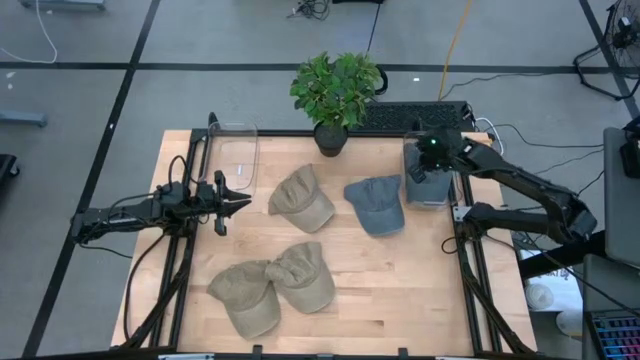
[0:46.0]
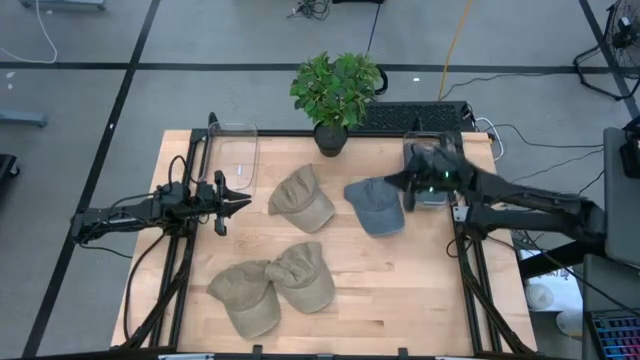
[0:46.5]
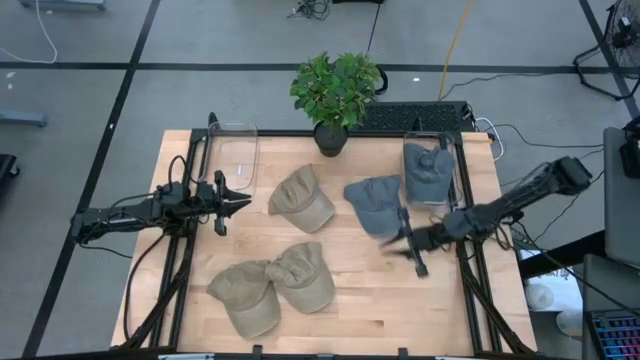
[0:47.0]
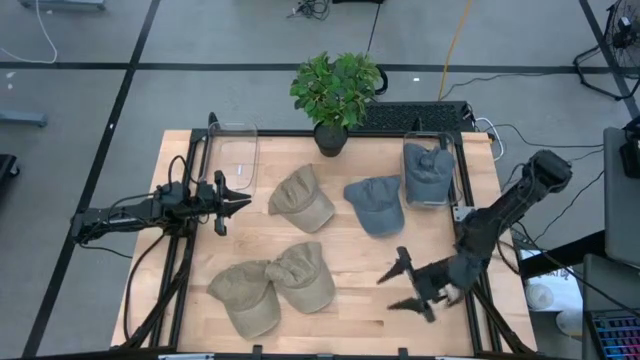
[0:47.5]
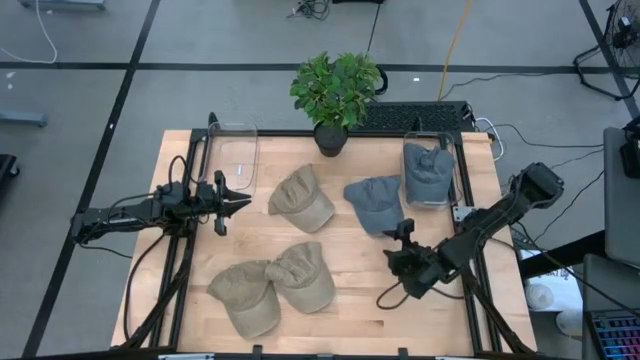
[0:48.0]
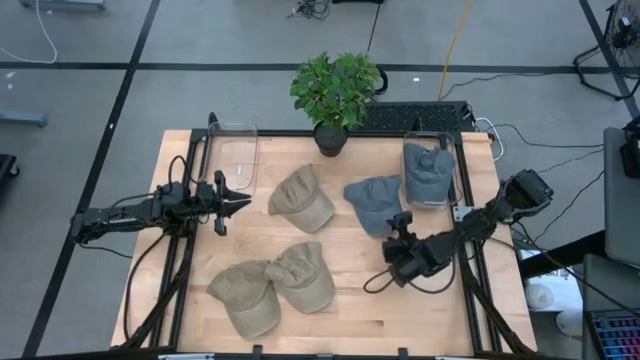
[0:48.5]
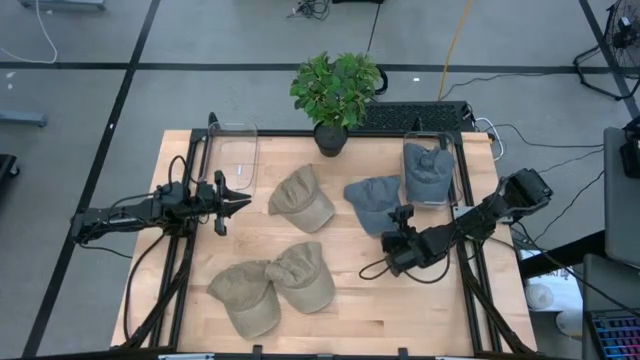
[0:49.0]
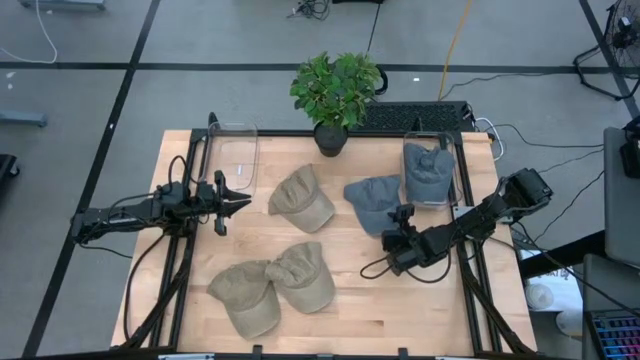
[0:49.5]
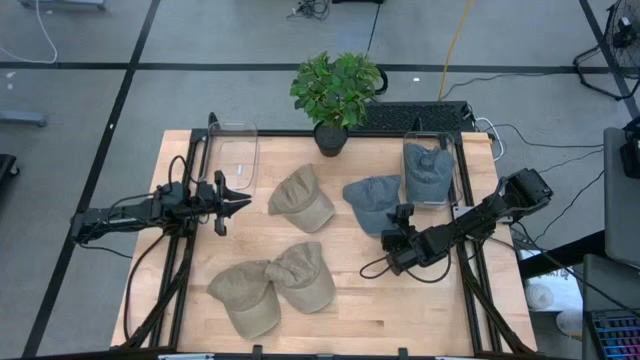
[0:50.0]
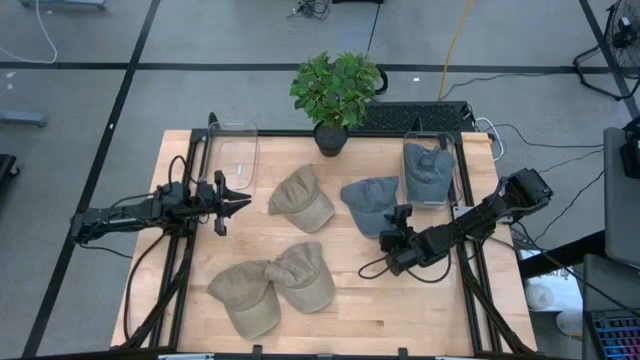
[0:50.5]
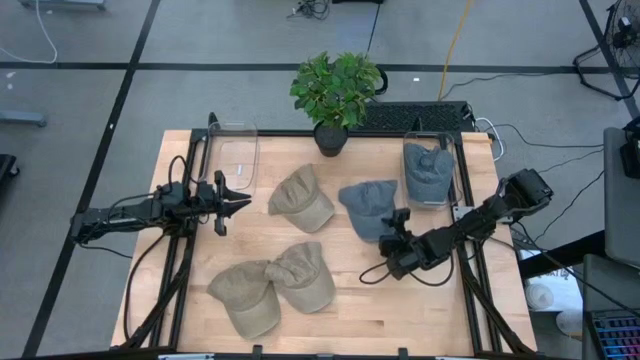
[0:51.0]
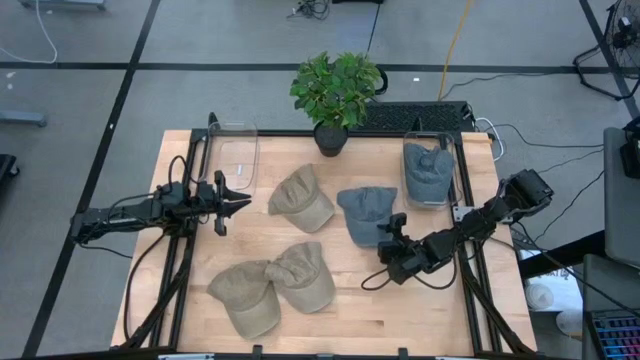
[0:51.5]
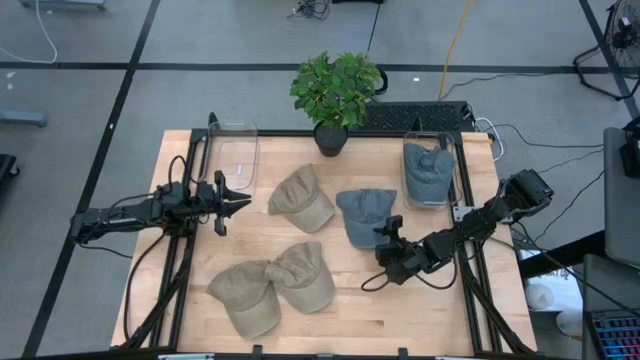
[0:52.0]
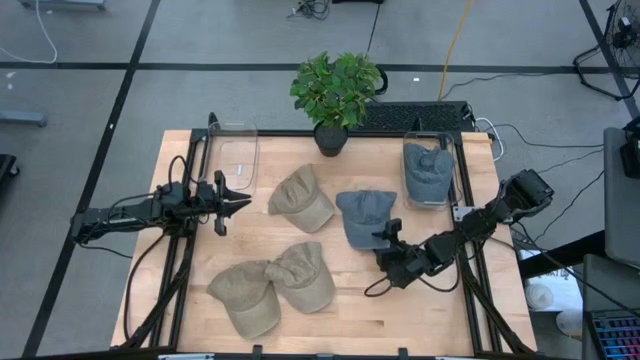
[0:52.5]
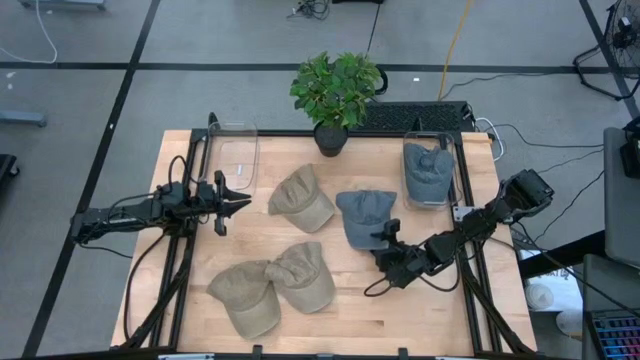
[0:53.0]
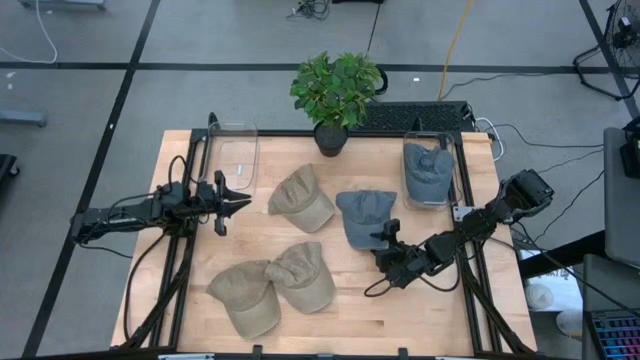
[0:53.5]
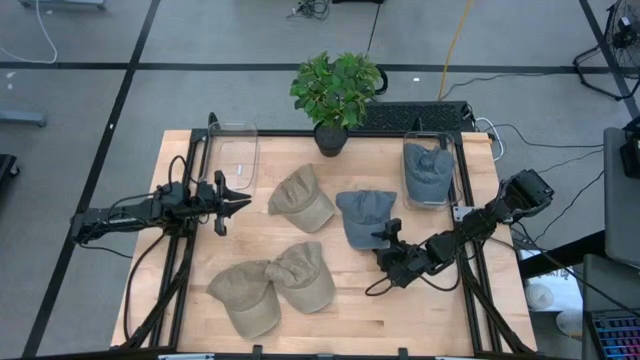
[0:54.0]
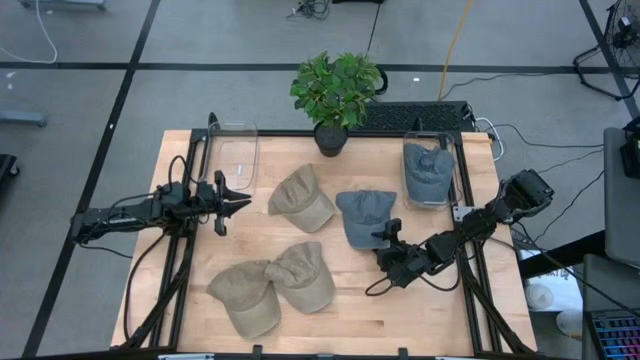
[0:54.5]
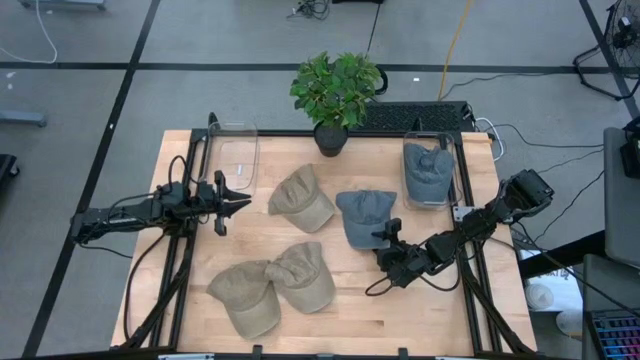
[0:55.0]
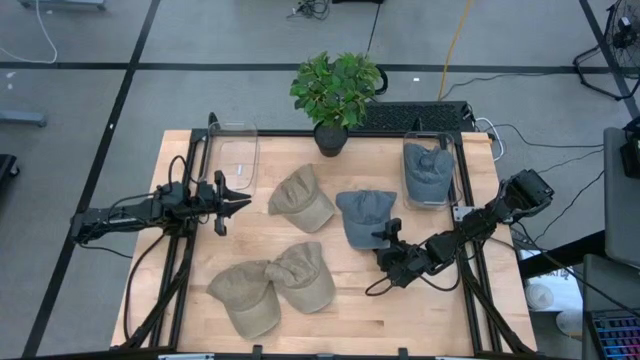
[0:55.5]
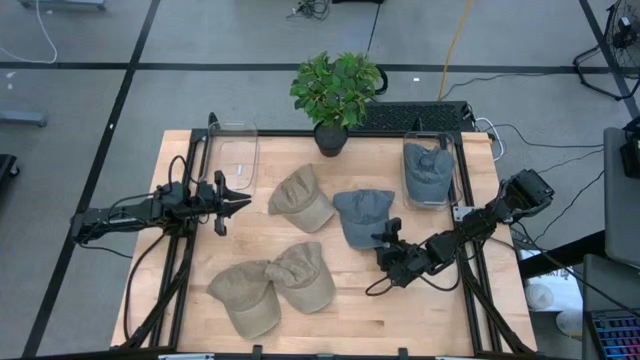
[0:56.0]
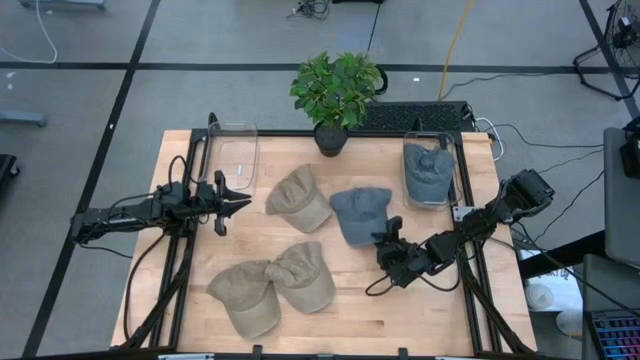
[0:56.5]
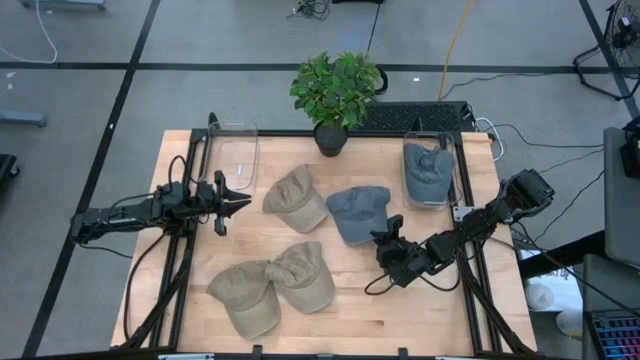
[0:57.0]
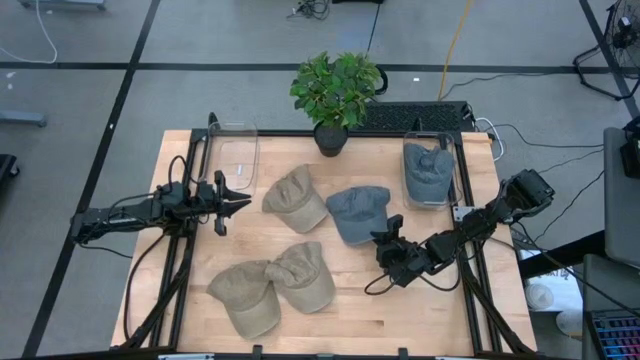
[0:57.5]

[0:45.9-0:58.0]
Task: Pick & Place hat
Put the blue cap into the right transparent bin

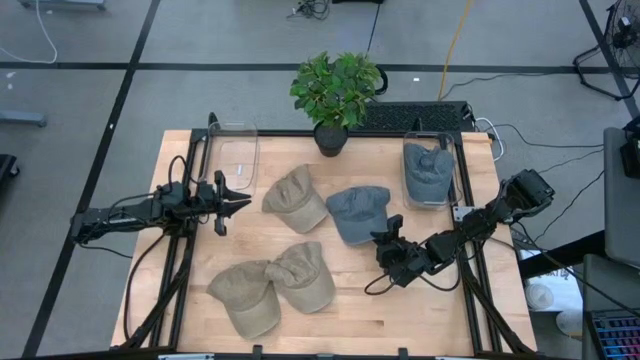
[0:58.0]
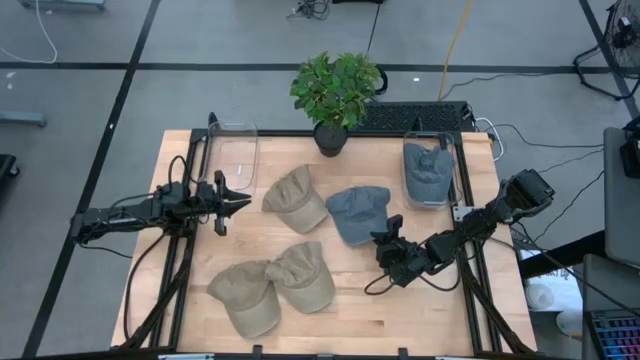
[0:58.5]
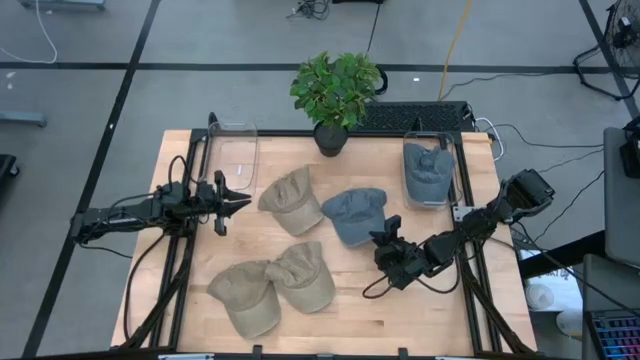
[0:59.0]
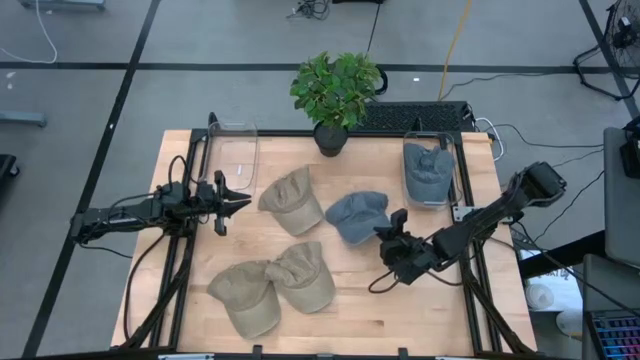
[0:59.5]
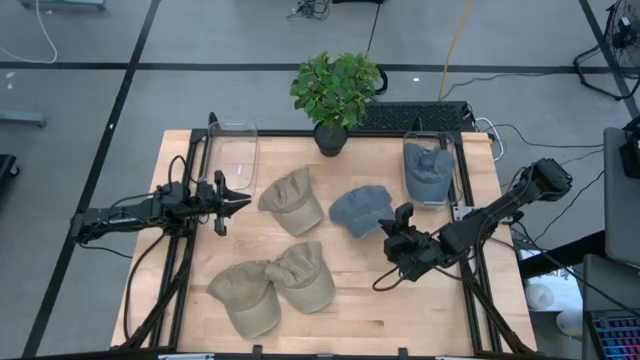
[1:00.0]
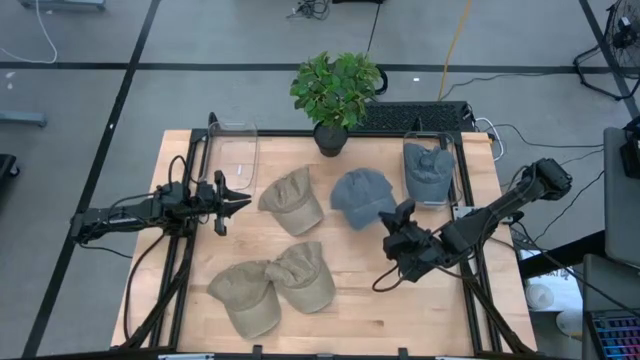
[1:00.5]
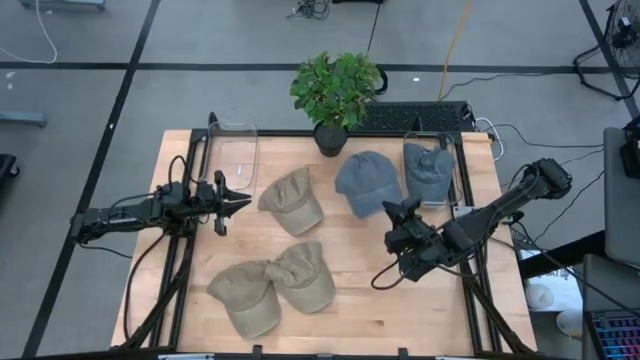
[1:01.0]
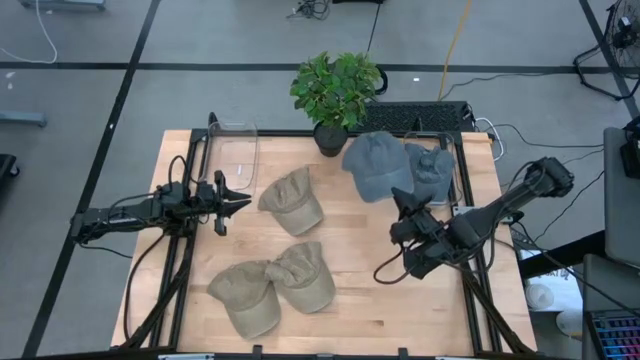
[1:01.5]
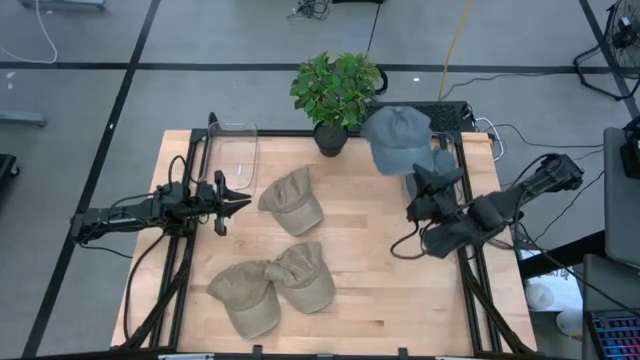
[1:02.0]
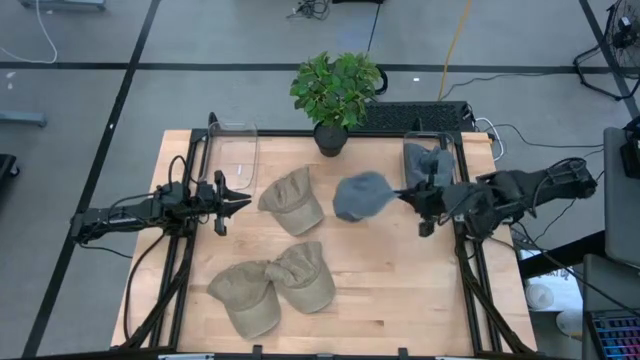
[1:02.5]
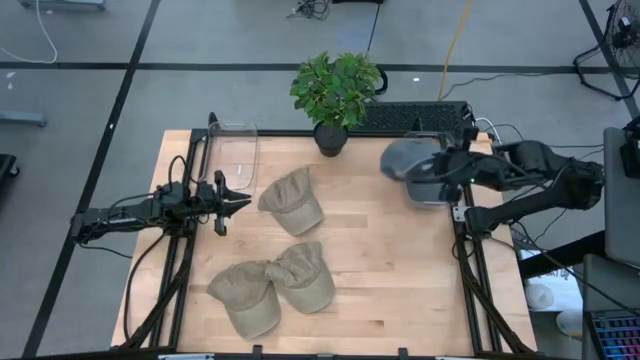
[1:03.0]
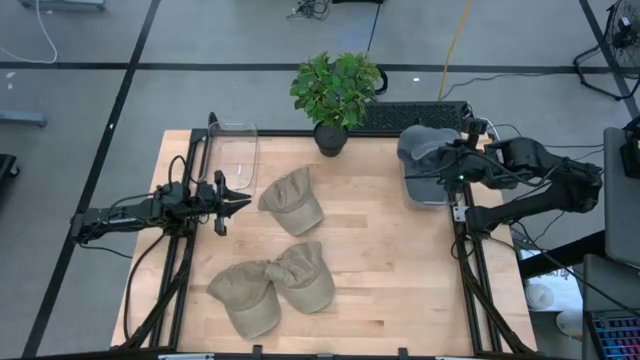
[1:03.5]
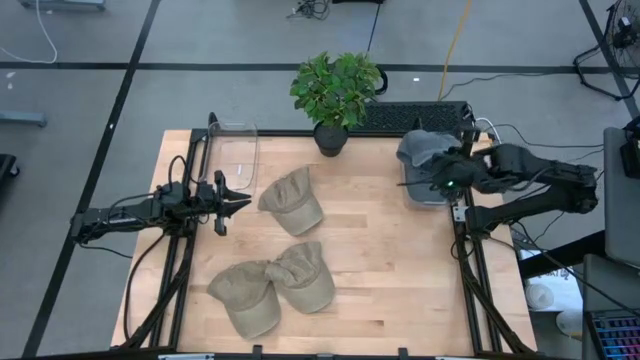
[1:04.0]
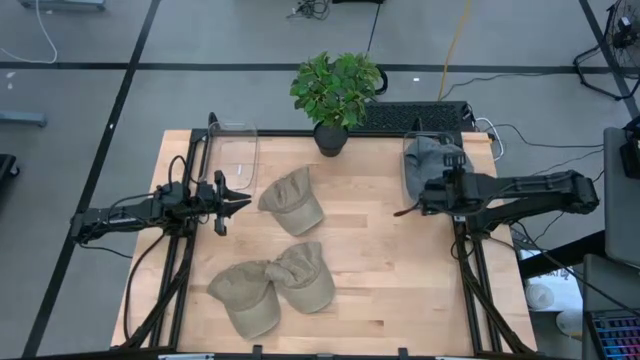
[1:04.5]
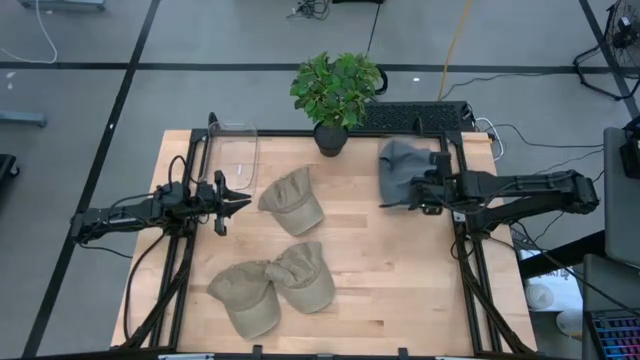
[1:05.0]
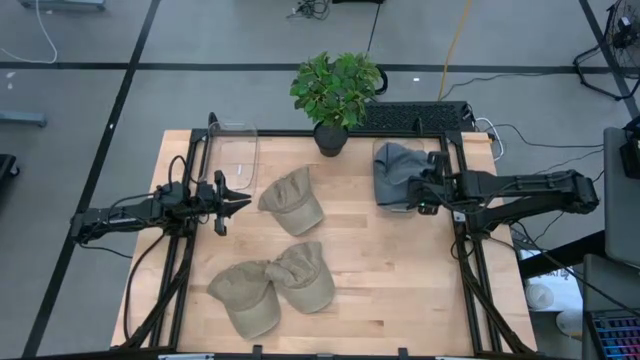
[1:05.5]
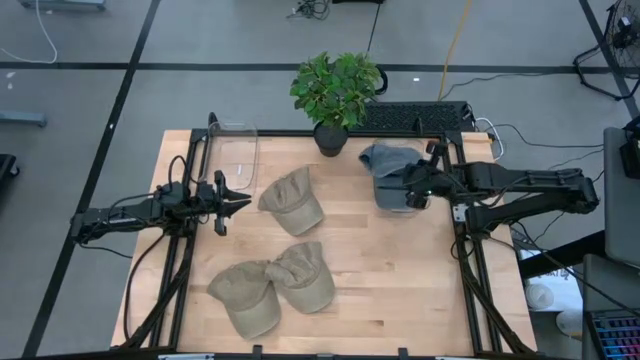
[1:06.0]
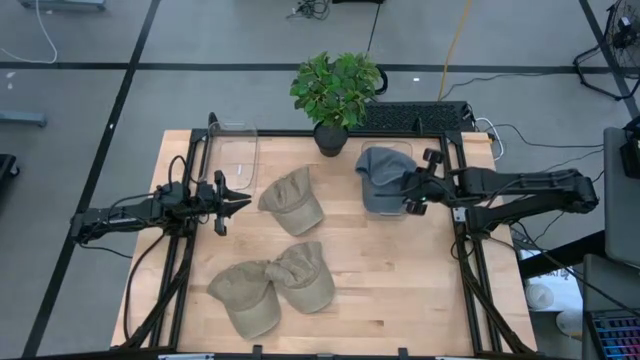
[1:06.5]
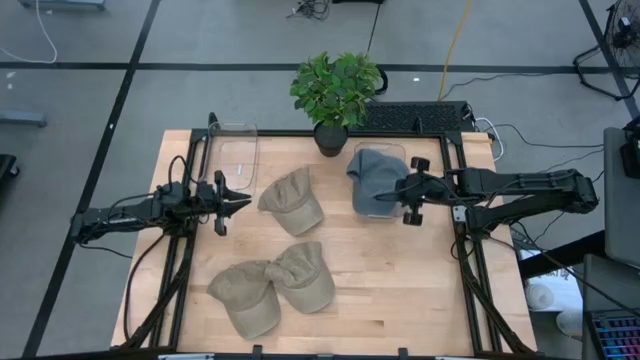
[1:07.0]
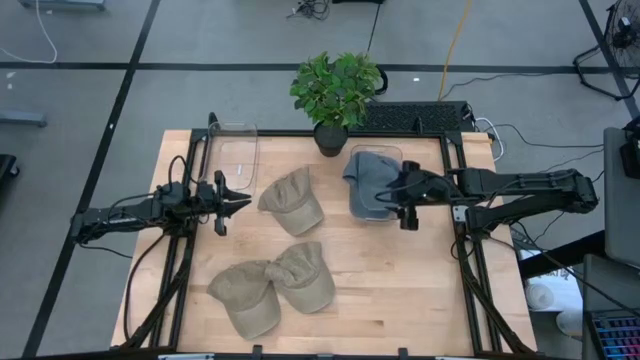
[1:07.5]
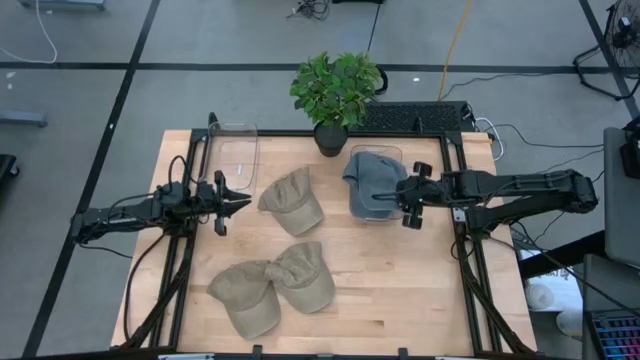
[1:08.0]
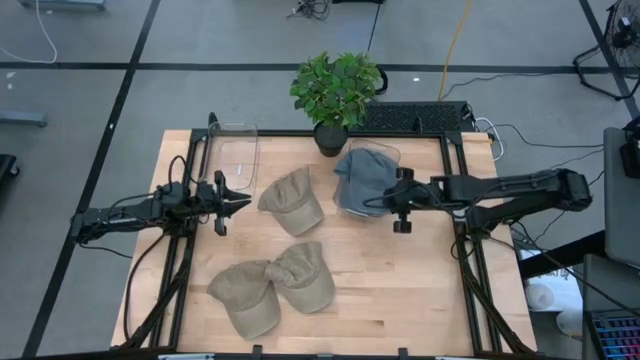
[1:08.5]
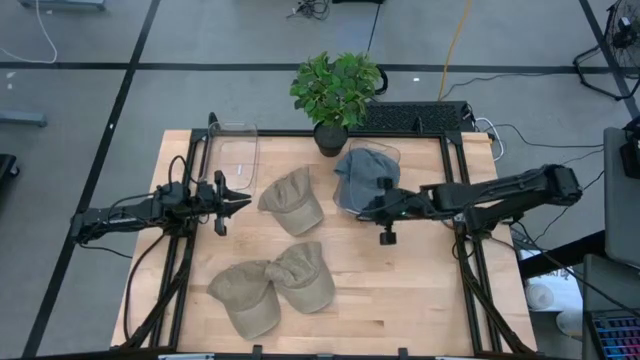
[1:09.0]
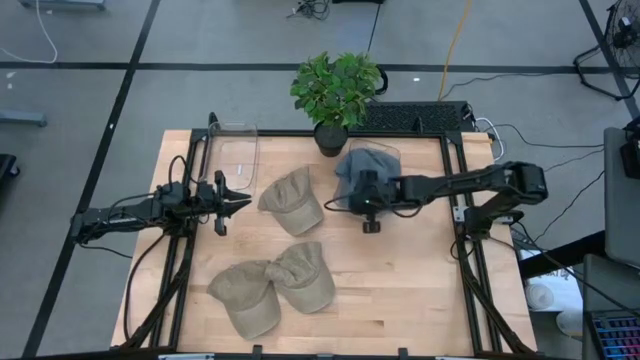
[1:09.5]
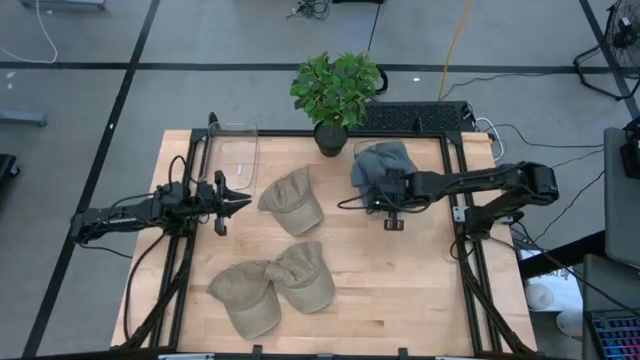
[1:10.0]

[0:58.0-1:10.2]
Put the blue cap into the right transparent bin
